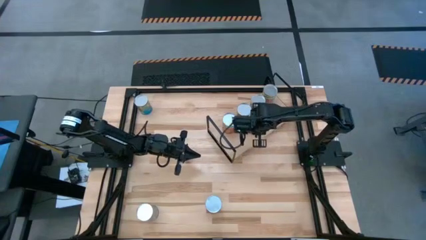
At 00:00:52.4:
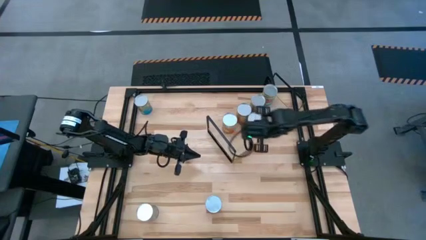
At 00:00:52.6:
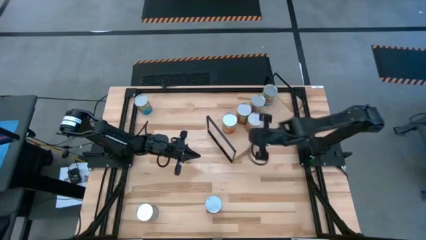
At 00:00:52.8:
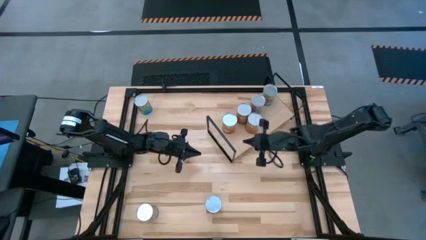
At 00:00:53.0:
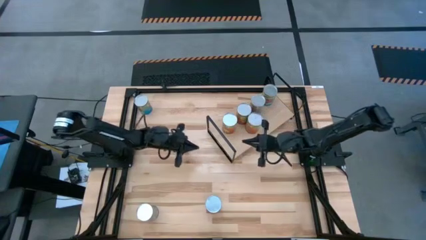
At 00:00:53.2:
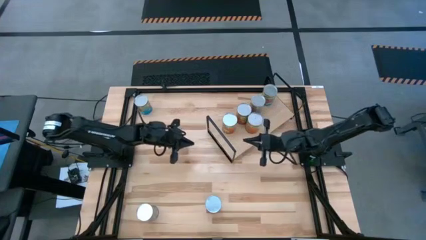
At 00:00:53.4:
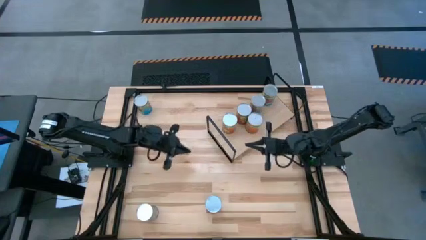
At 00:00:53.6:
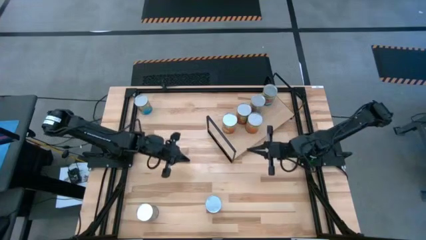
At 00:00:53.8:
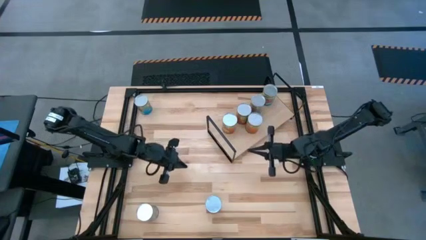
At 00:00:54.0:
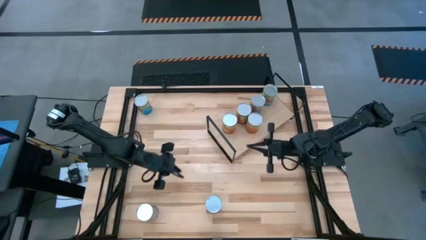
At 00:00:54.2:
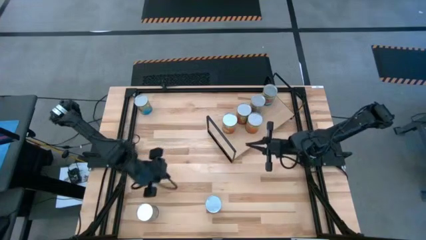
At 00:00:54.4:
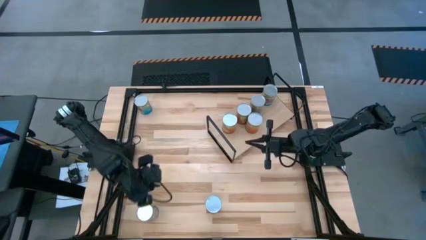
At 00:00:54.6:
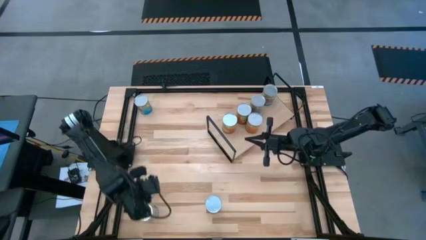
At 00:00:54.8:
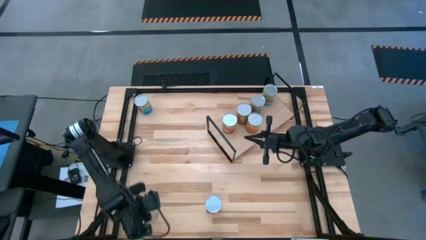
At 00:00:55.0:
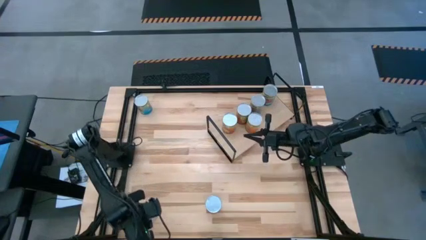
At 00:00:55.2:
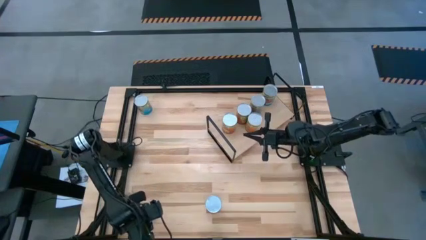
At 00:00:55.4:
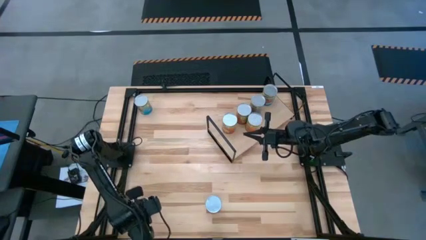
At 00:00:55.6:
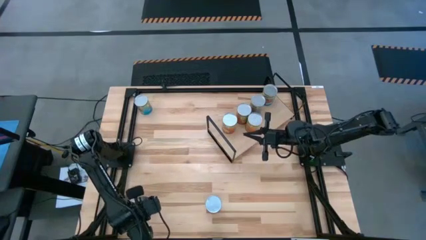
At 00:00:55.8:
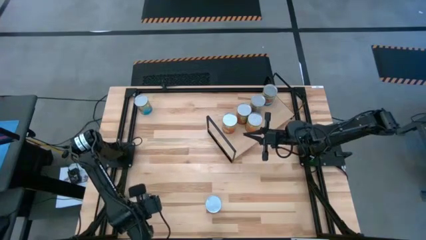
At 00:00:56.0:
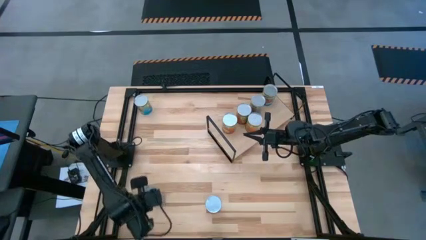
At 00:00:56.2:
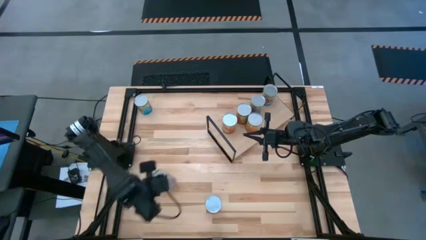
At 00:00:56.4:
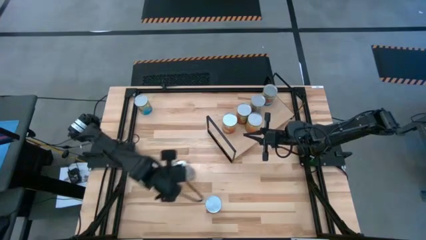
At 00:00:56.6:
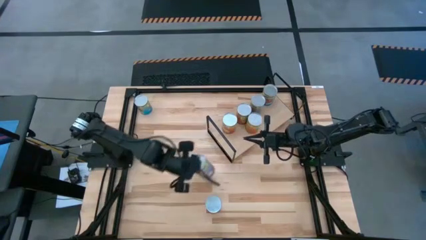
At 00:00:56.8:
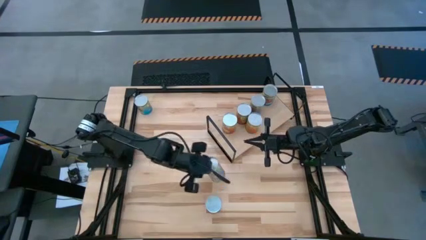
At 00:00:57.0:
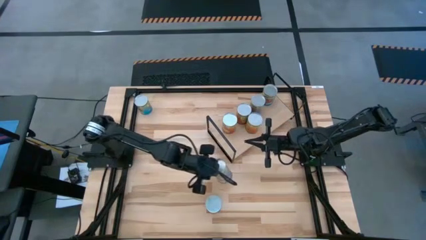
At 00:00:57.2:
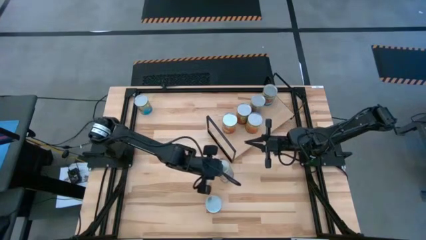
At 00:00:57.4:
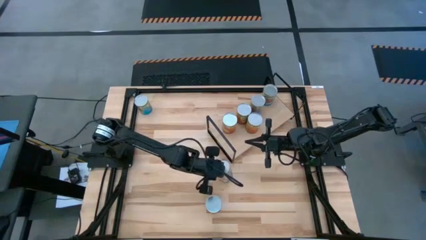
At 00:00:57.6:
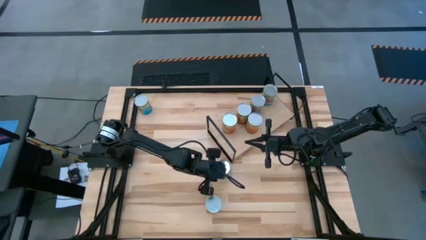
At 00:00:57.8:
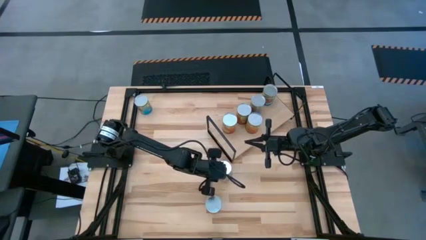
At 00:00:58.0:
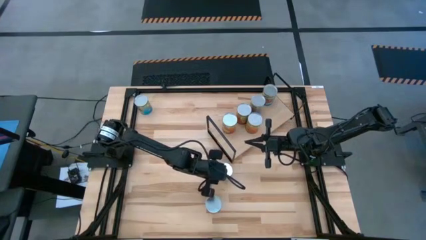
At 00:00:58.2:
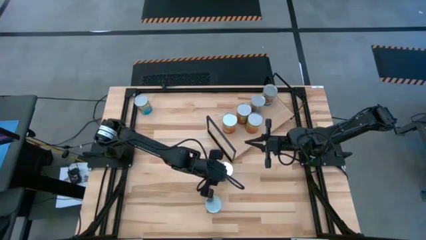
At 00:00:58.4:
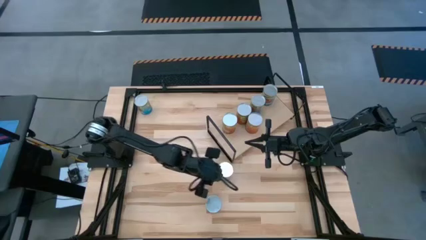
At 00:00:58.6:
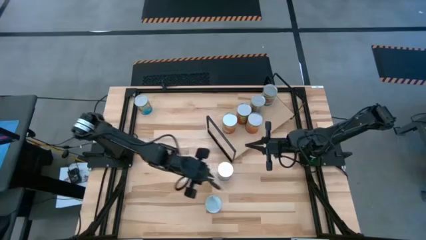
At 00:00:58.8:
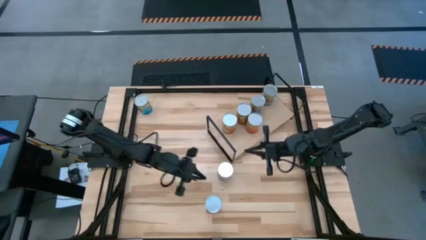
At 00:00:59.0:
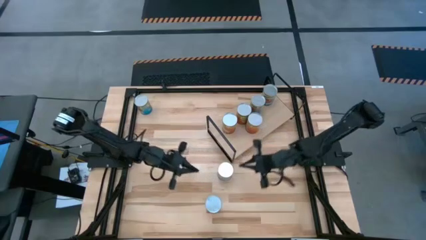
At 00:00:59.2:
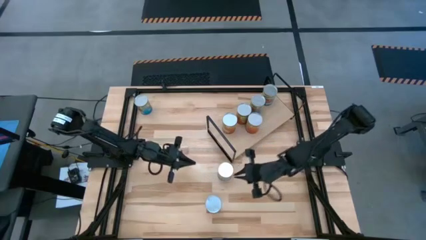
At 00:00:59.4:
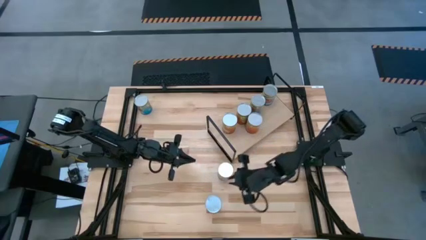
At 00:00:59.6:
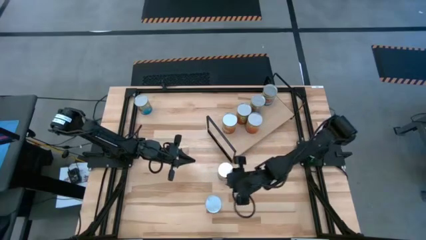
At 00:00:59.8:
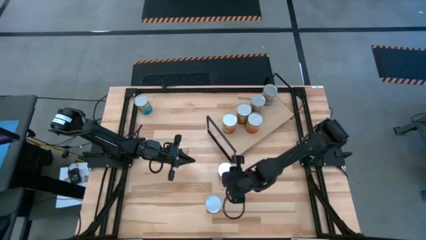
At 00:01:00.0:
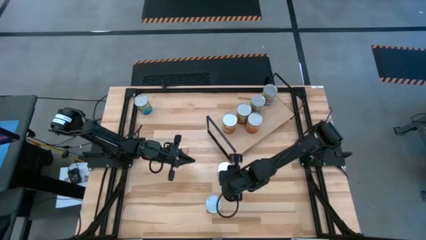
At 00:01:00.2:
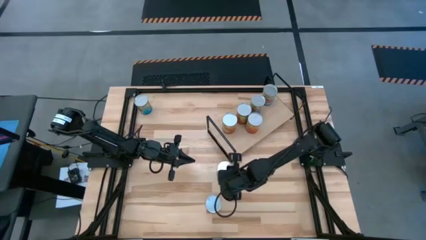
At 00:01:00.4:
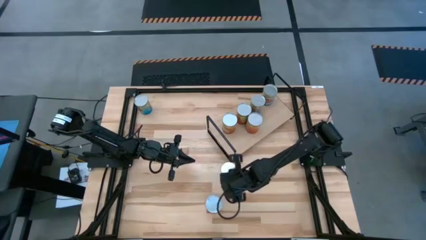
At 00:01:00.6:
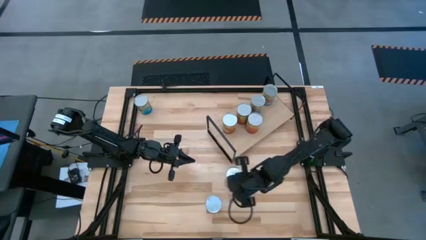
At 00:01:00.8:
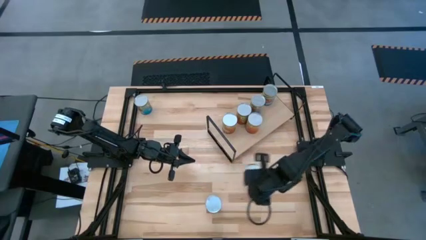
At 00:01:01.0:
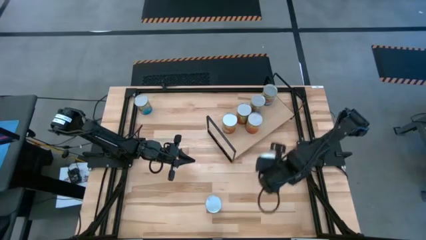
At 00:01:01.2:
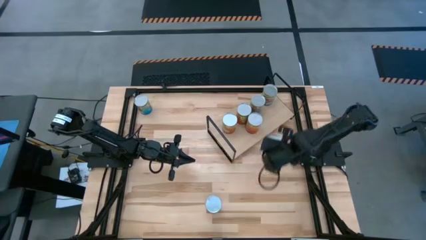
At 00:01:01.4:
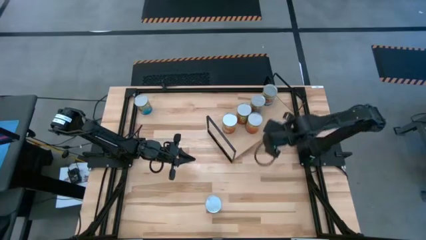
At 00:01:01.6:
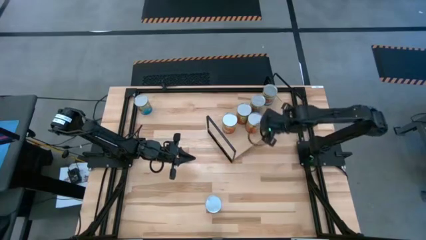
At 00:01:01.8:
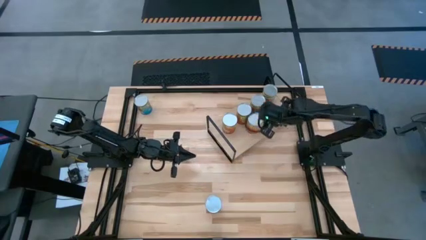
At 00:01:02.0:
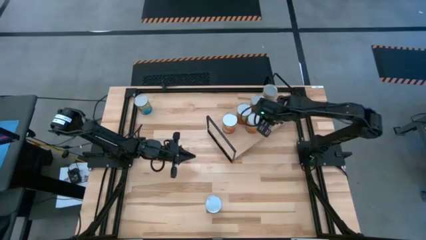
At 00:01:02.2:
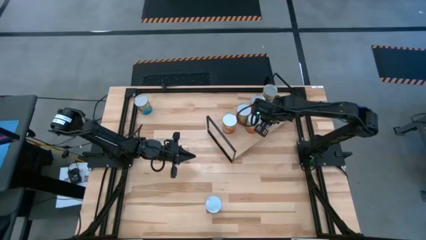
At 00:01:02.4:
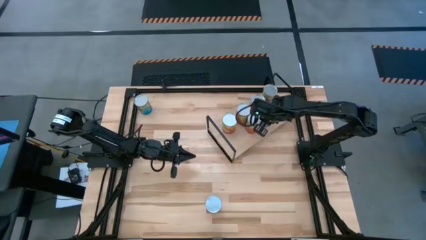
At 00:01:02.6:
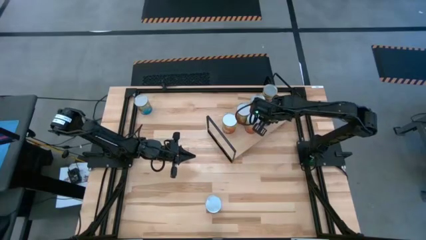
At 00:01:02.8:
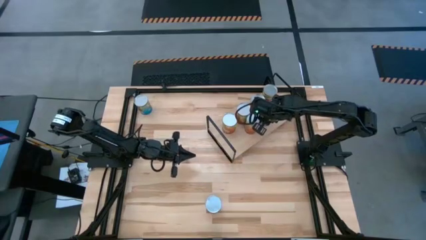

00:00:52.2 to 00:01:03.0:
Task: Pick and place cans onto a shelf
Put the canned peaches on the shelf aligned with the other canned peaches

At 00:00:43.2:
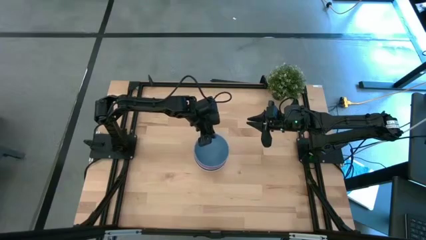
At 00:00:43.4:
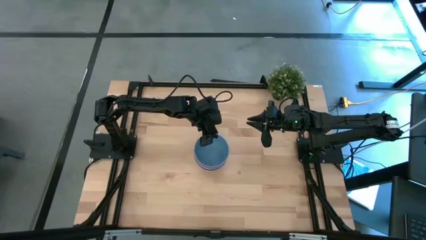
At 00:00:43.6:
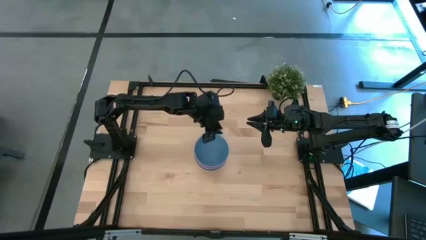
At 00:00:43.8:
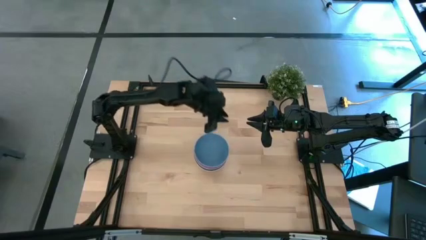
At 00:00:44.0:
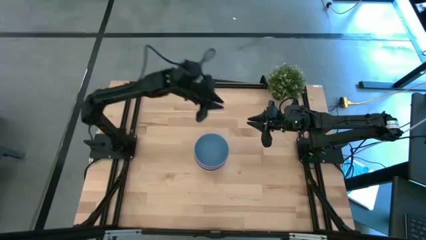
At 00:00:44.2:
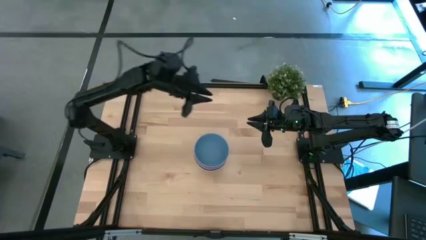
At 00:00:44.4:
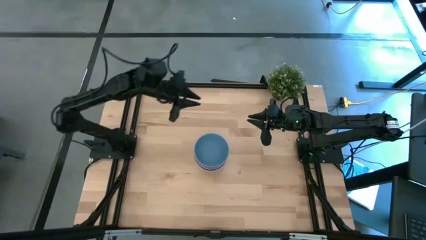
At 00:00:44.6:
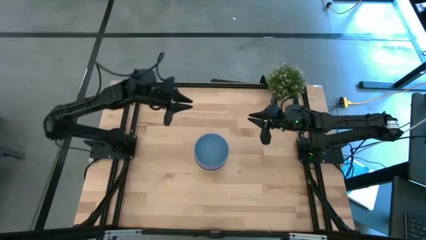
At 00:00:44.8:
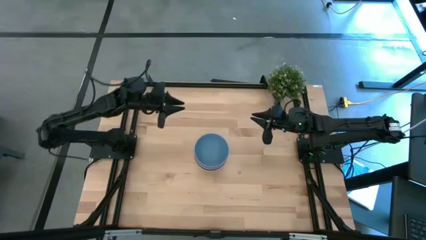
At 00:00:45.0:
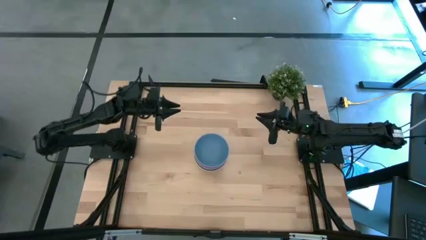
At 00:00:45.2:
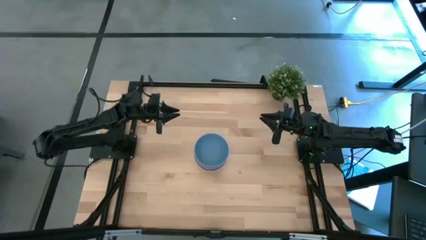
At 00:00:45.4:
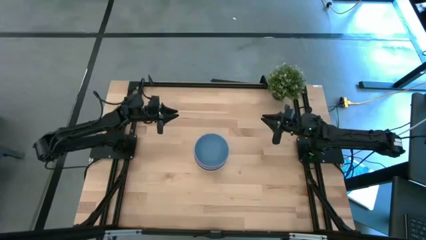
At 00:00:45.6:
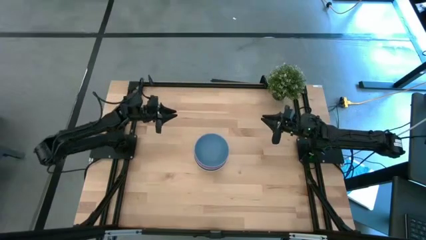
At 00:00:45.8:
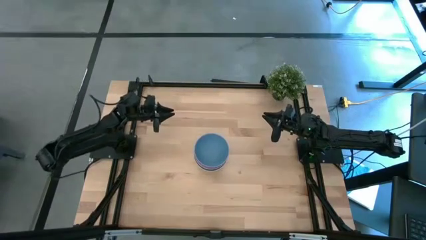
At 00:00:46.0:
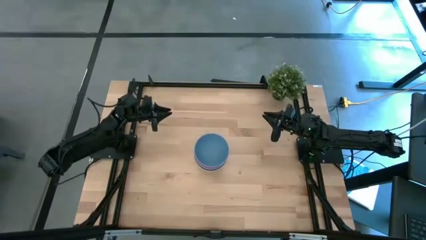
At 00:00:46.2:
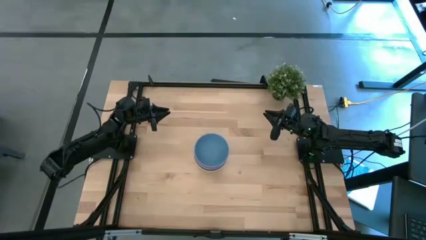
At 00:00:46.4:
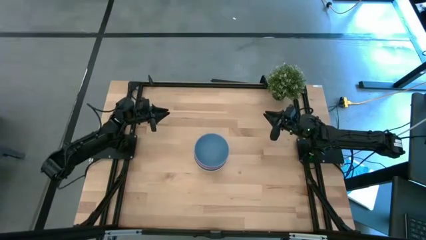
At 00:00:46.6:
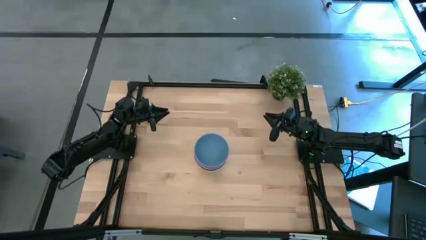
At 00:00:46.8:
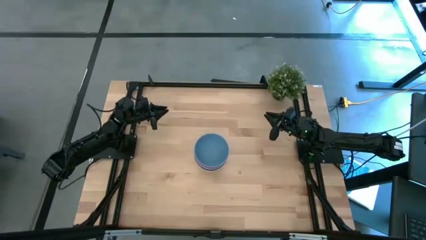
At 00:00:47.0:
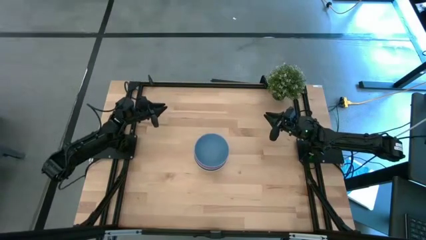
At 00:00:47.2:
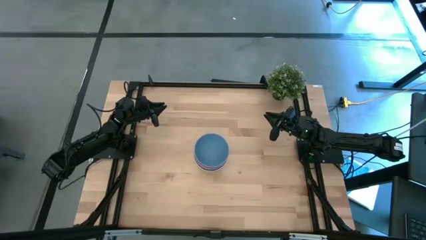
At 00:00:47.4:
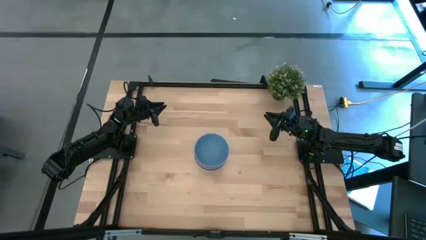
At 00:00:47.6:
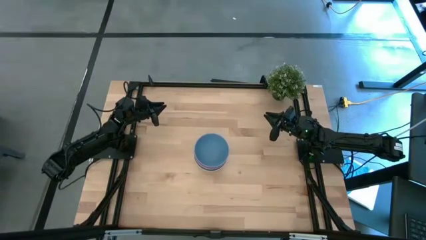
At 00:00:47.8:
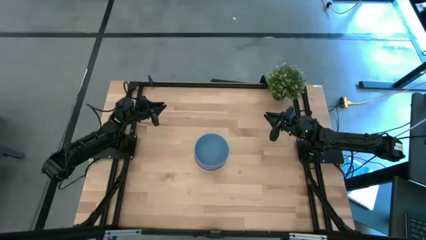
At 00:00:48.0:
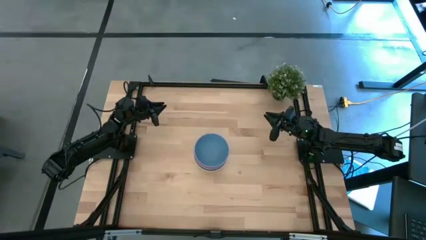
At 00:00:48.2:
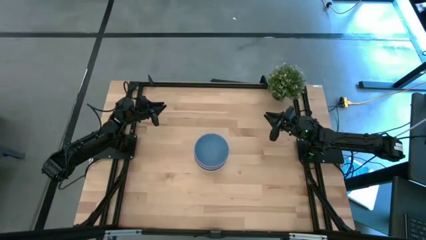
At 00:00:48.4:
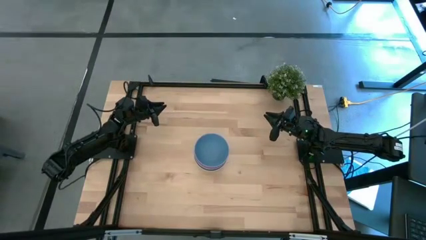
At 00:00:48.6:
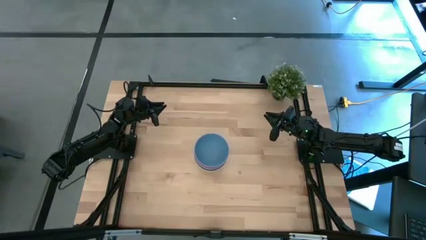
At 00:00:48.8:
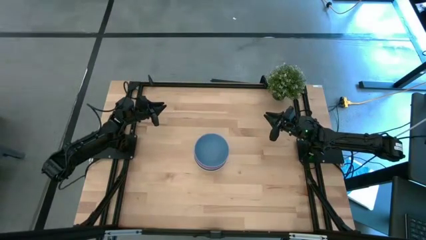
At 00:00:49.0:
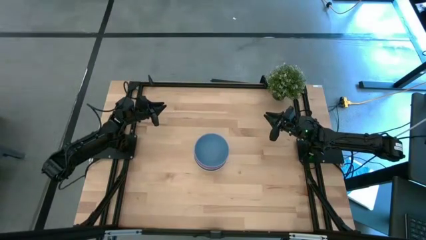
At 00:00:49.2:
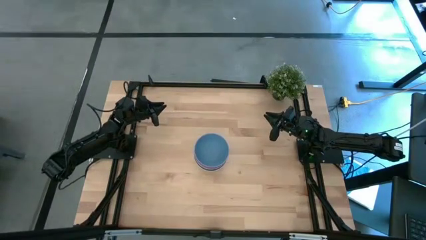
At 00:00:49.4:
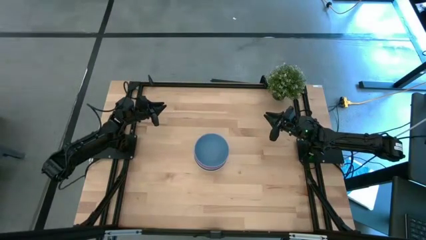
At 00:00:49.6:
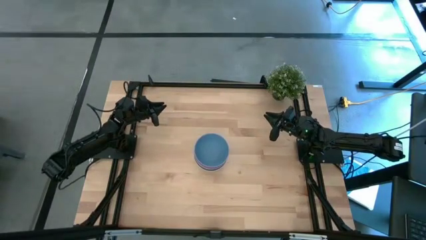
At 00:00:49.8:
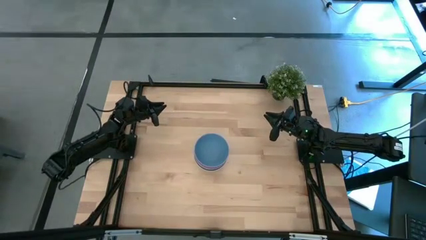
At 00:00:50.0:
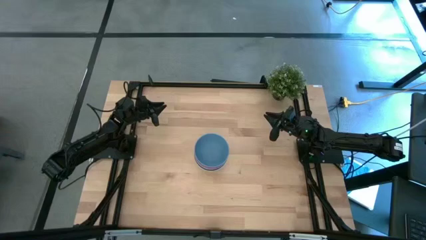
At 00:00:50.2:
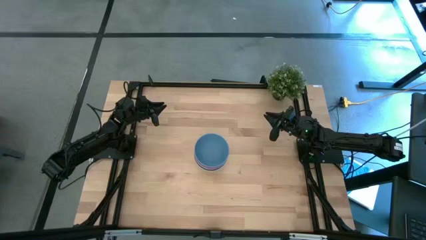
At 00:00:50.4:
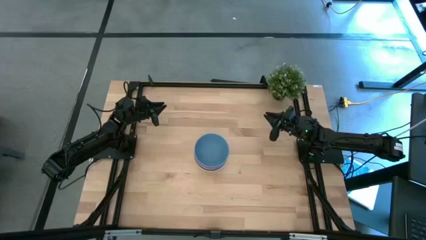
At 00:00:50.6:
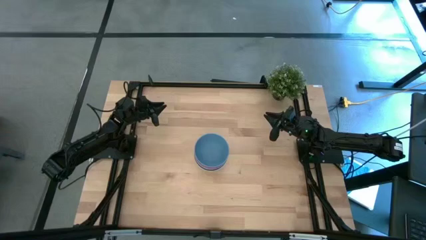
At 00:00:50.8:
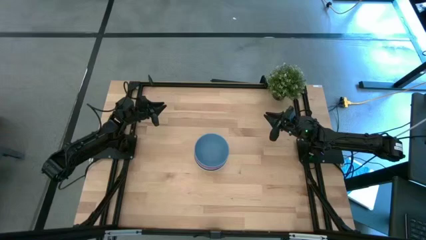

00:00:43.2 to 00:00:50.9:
Task: Nest bowls inside each other
Return to Home Position
